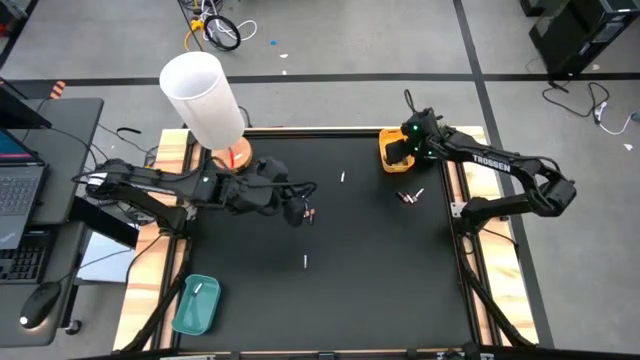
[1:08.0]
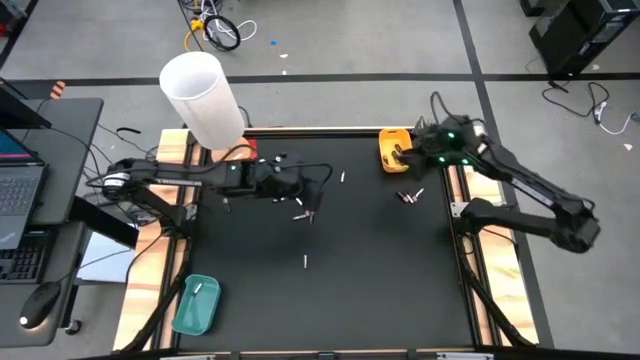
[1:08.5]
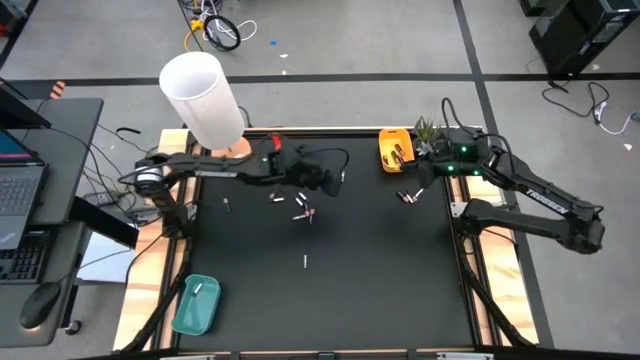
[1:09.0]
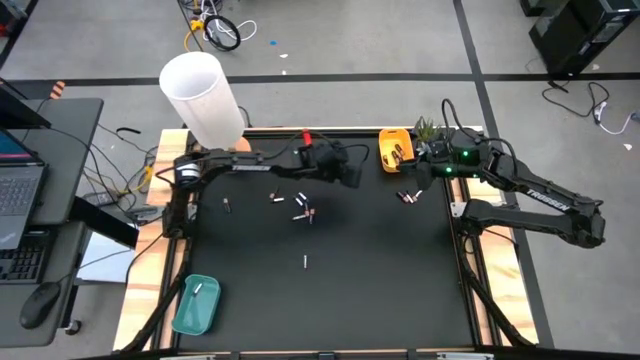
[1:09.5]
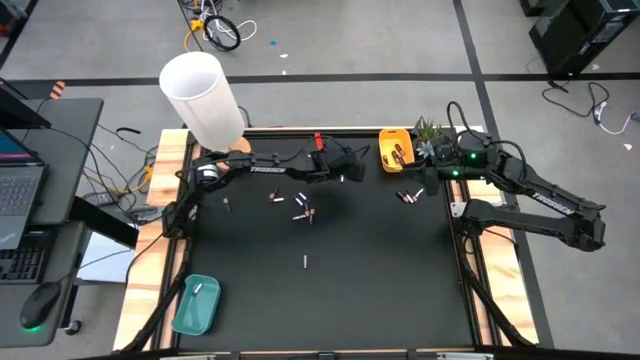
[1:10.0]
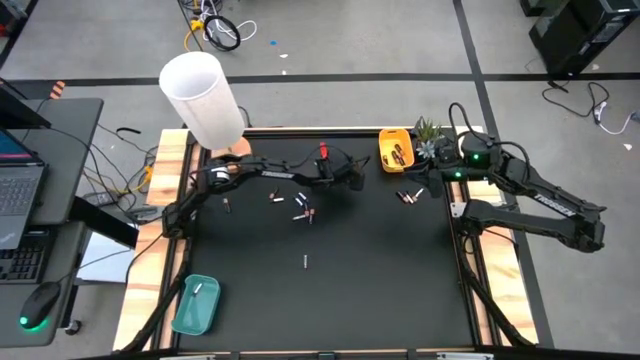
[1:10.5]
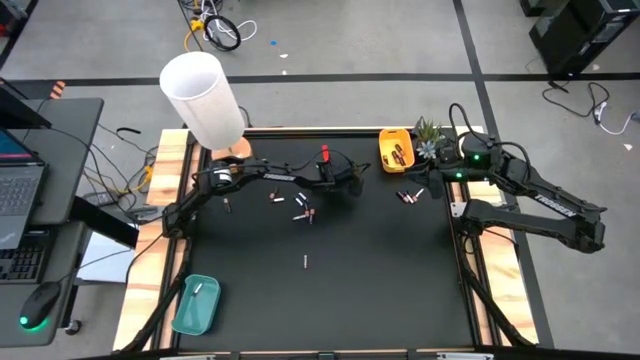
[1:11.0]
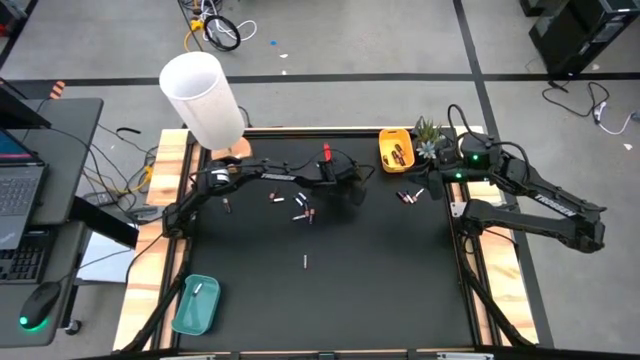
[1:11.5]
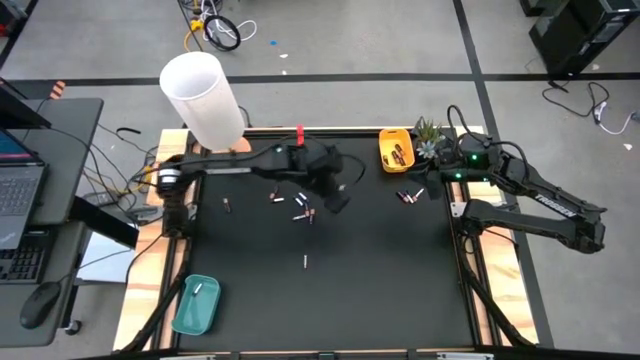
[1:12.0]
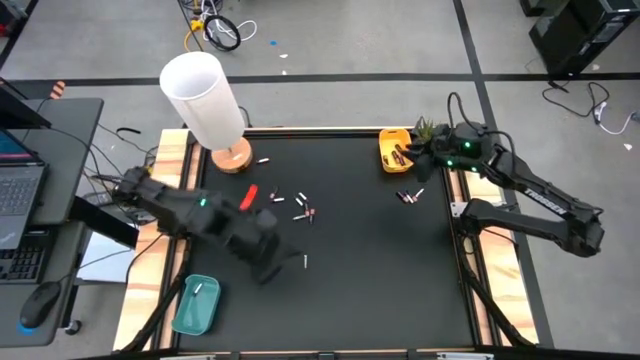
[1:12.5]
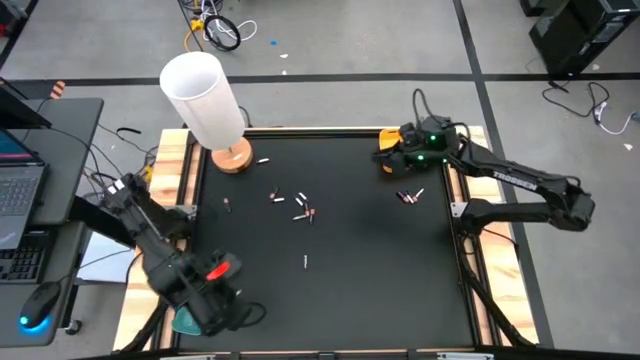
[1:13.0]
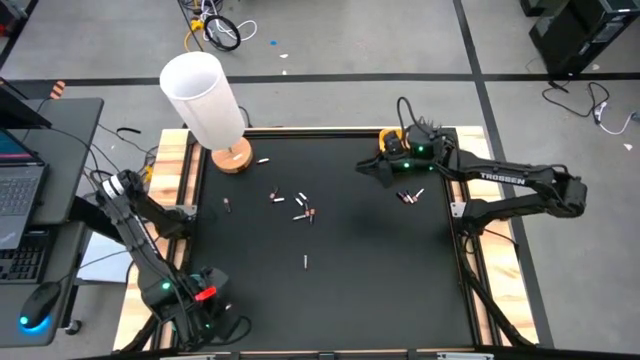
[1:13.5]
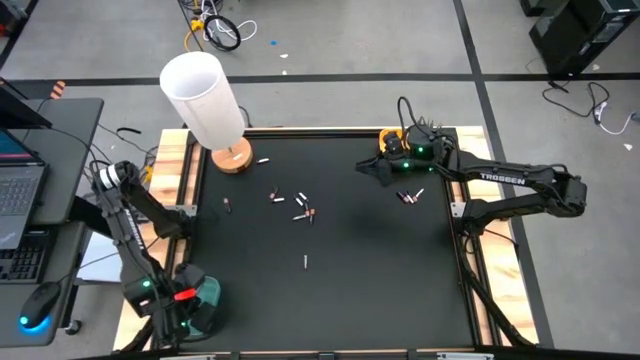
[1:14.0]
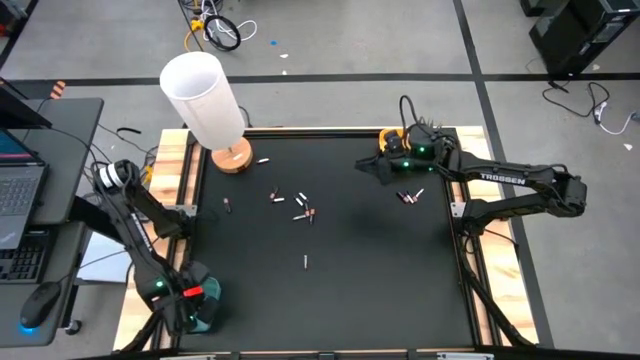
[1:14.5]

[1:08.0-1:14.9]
Task: Sort batteries
Put the silver battery into the blue bin

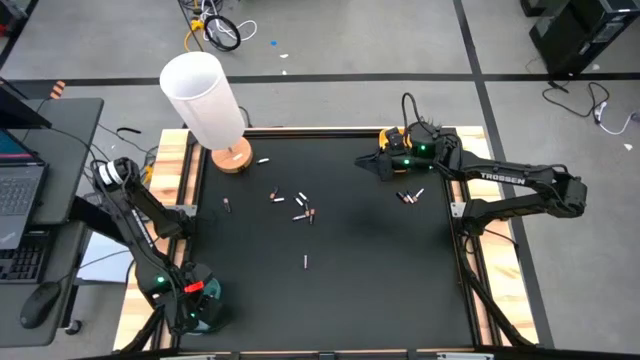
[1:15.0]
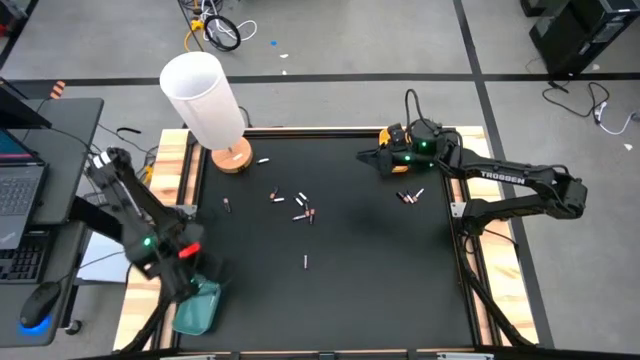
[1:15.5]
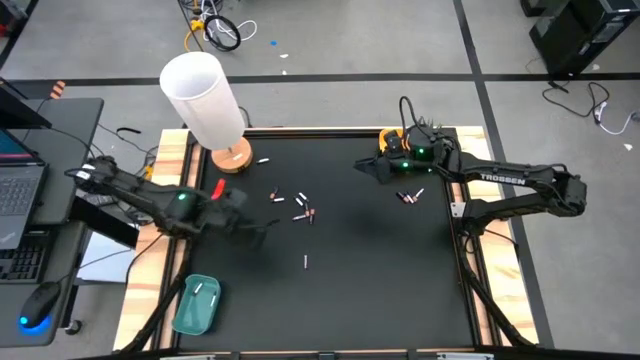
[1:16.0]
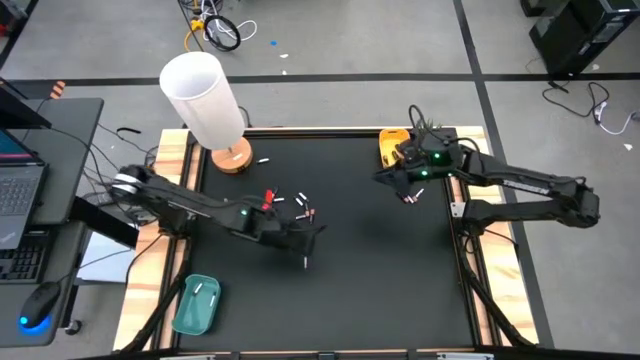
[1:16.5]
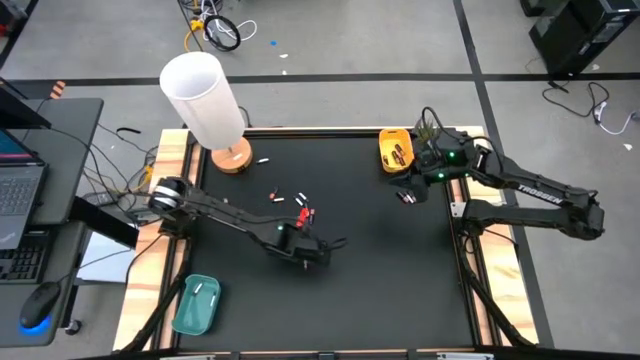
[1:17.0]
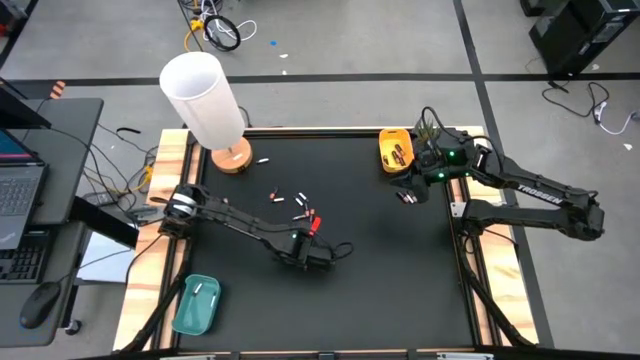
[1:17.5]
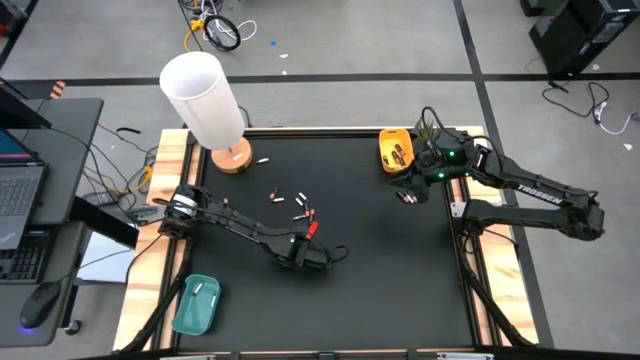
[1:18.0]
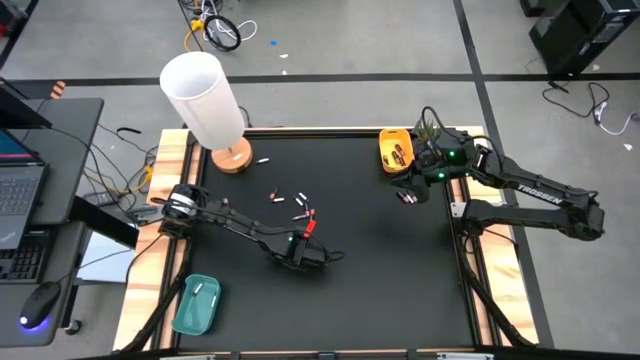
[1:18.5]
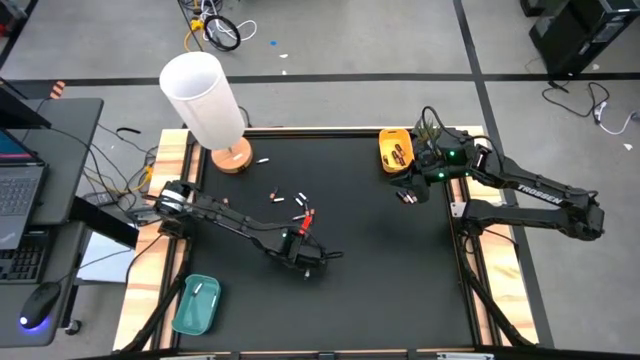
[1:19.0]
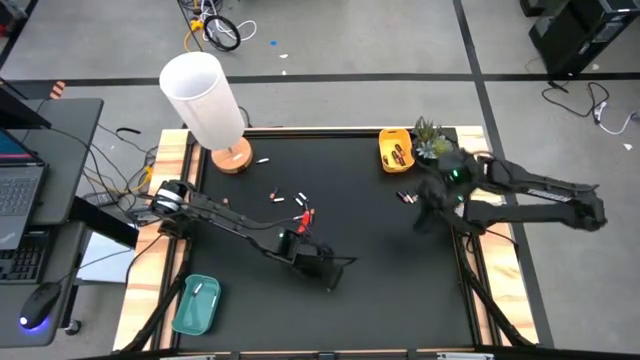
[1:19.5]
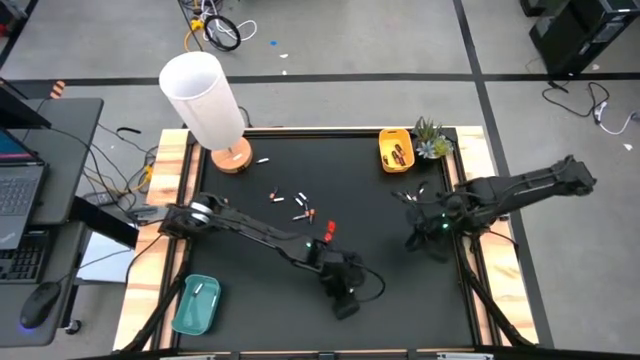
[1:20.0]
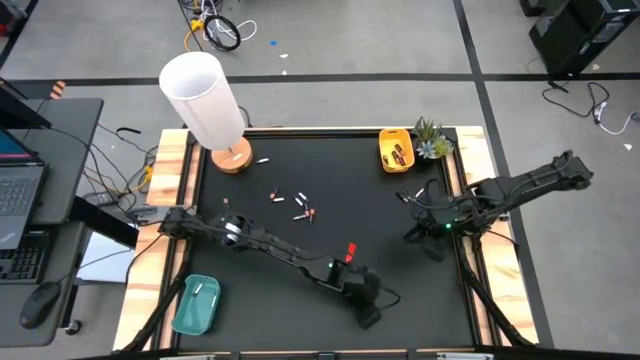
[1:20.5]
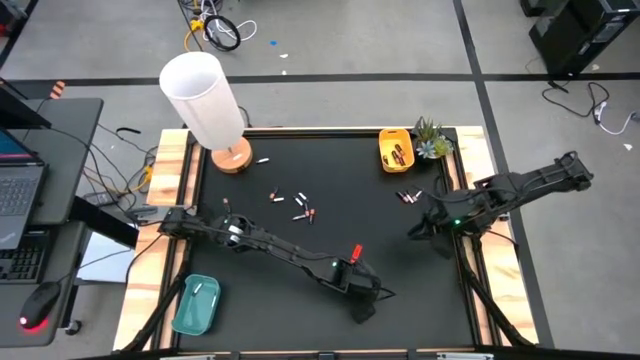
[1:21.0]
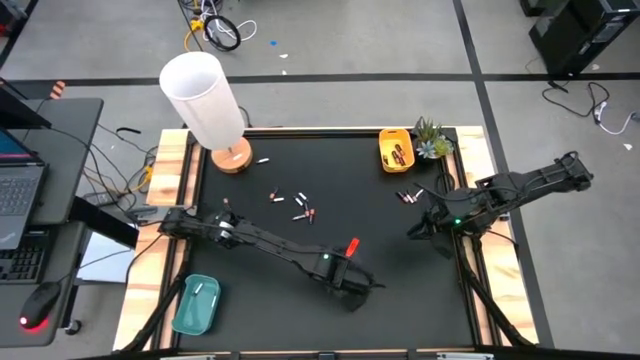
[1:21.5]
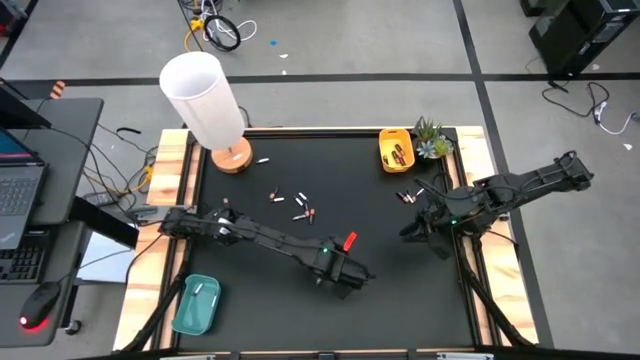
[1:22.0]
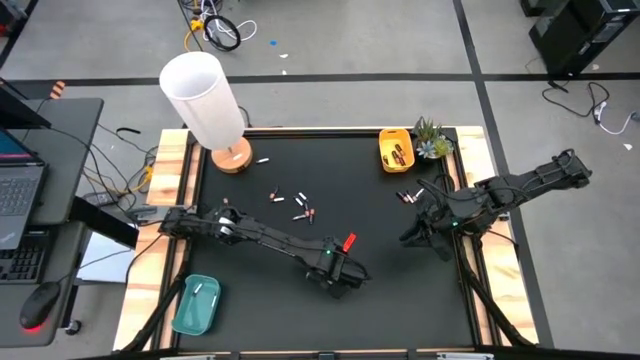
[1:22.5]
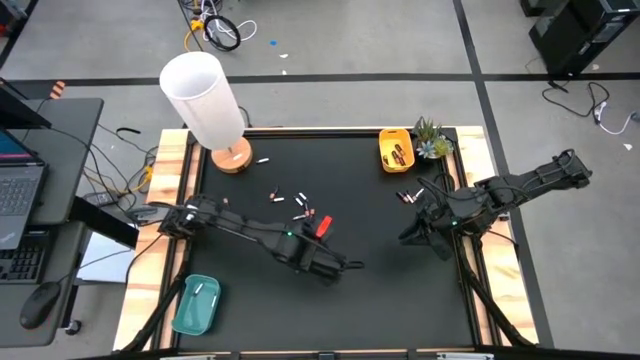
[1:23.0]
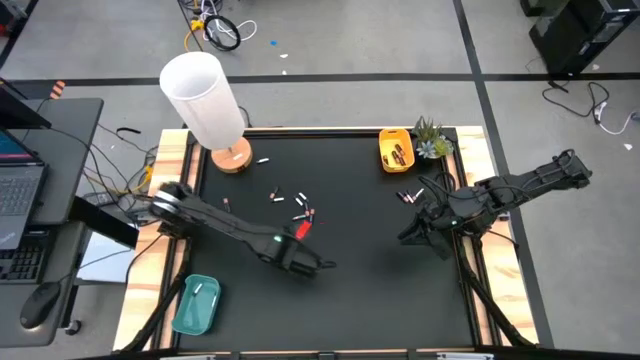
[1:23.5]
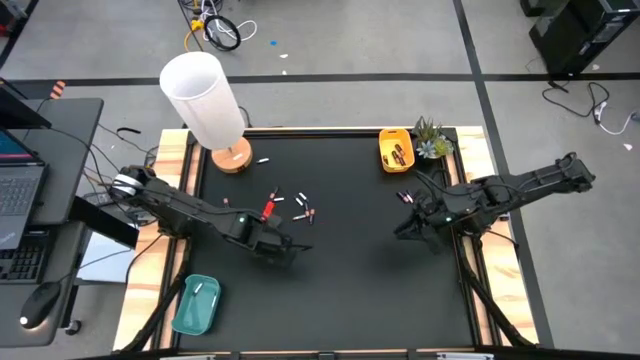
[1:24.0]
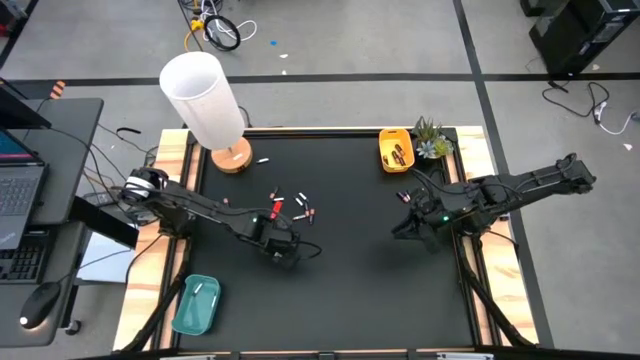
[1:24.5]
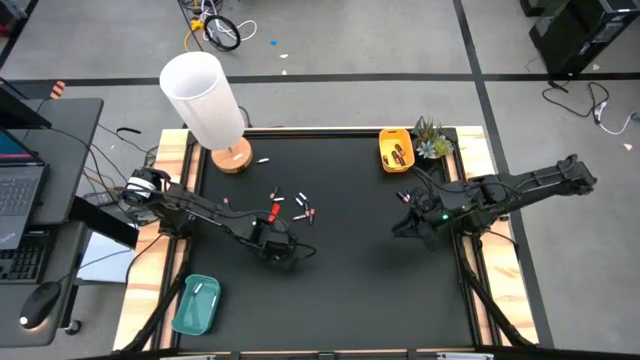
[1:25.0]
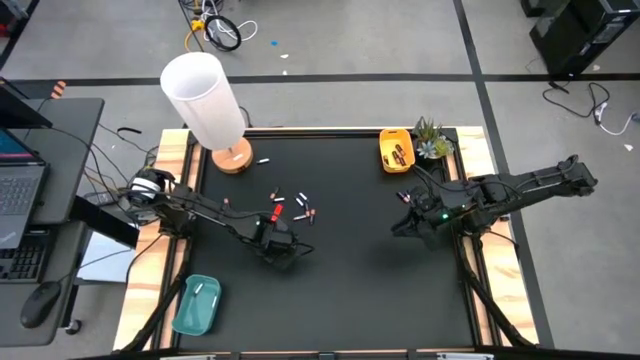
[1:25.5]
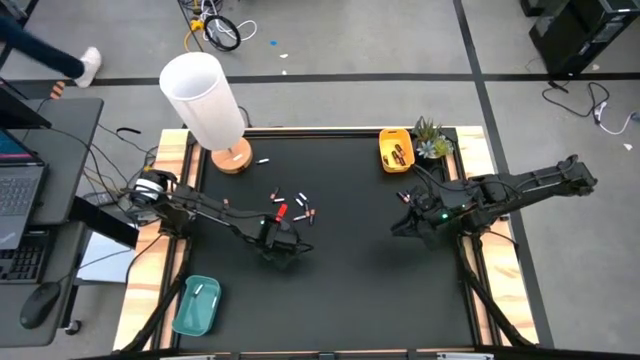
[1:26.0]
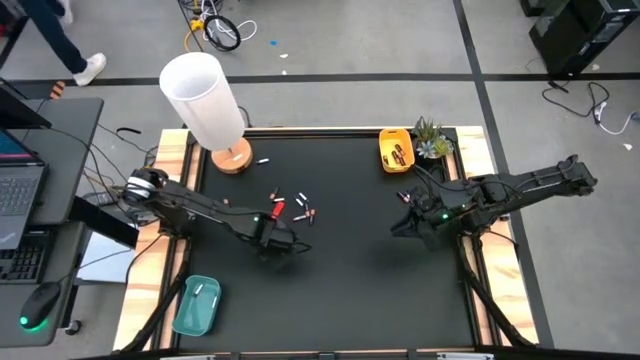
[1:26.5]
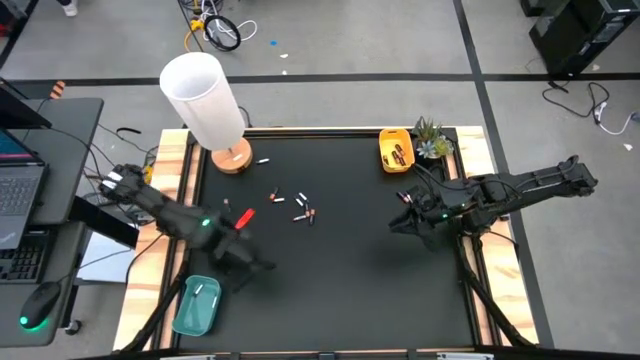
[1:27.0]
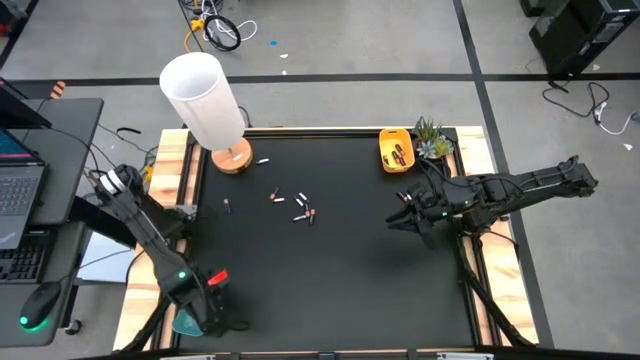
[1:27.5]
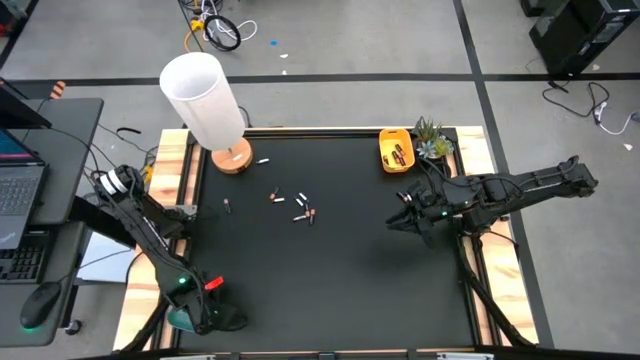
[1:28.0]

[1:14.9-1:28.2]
Put the silver battery into the blue bin

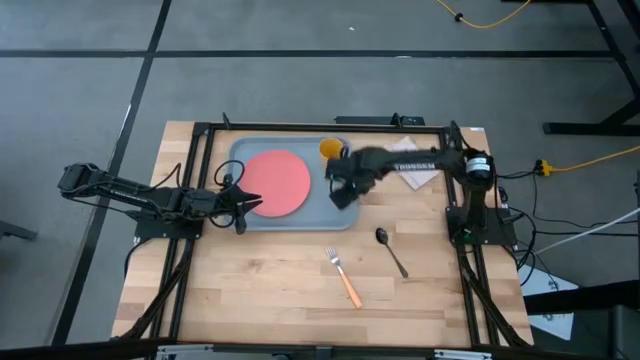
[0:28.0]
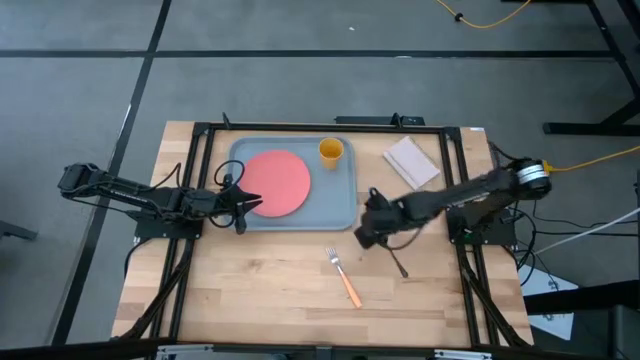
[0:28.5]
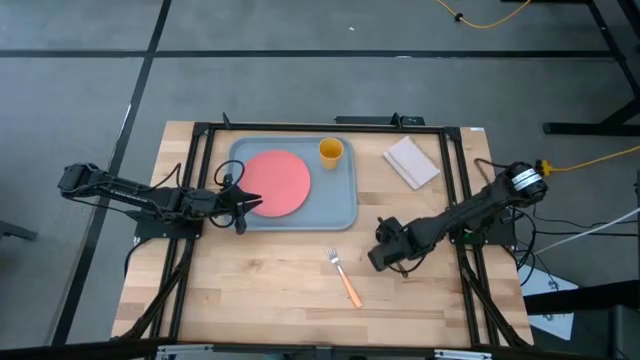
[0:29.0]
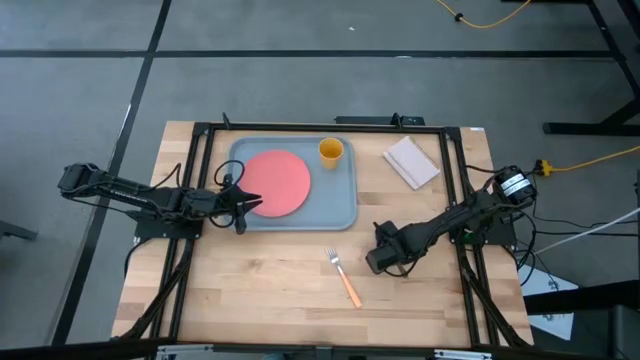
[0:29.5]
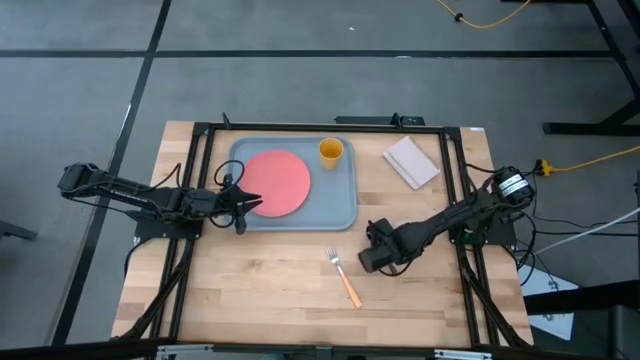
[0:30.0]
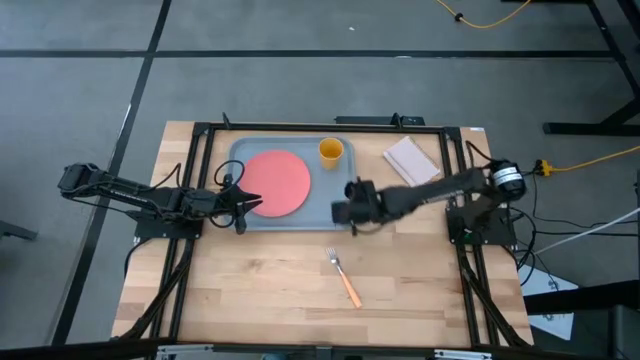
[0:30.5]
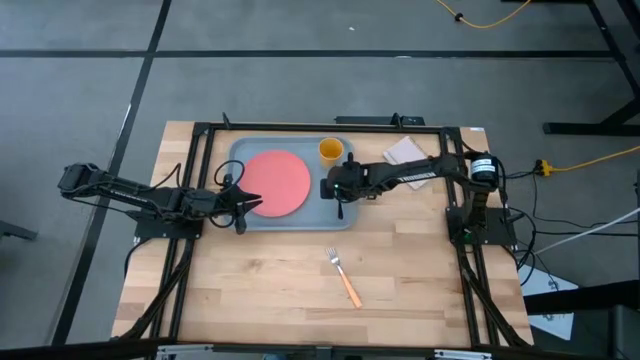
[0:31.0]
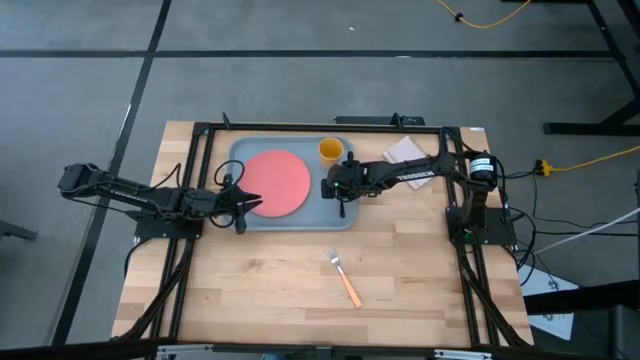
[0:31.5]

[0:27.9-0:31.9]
Task: Pick and place plate/cup/fork/spoon on tray
Put the black spoon on the blue serving tray to the right of the pink plate
